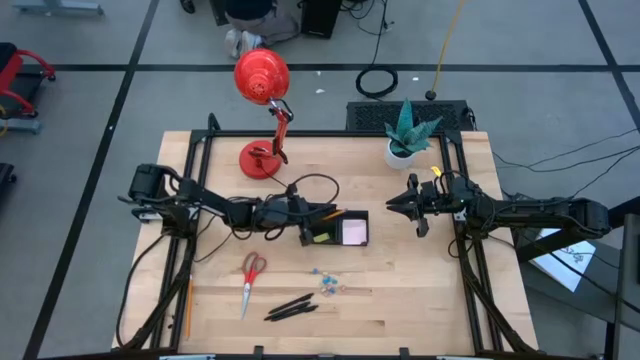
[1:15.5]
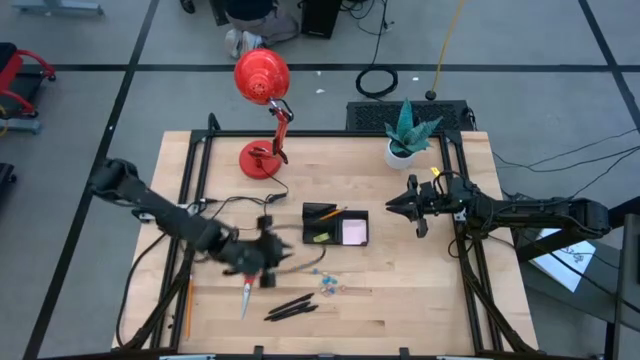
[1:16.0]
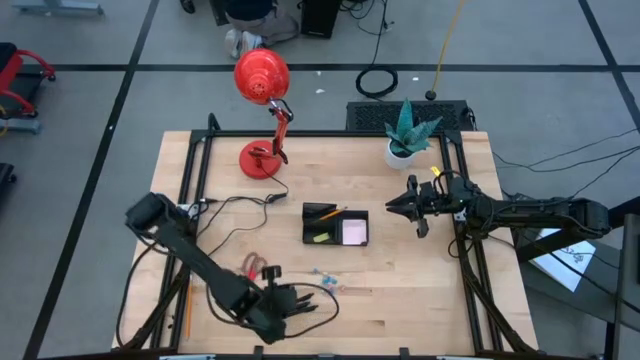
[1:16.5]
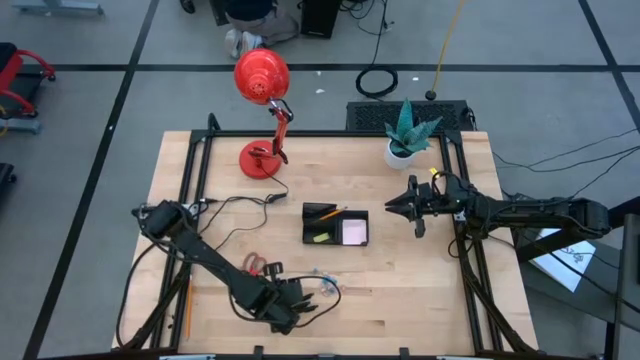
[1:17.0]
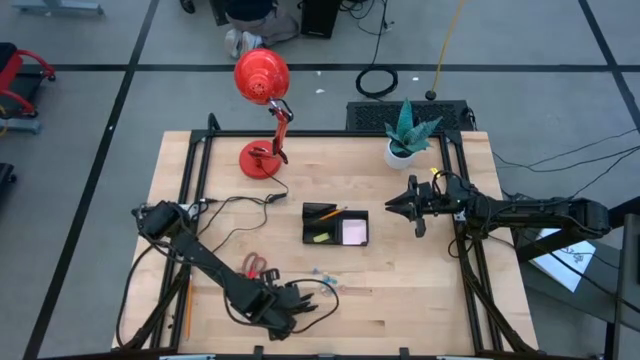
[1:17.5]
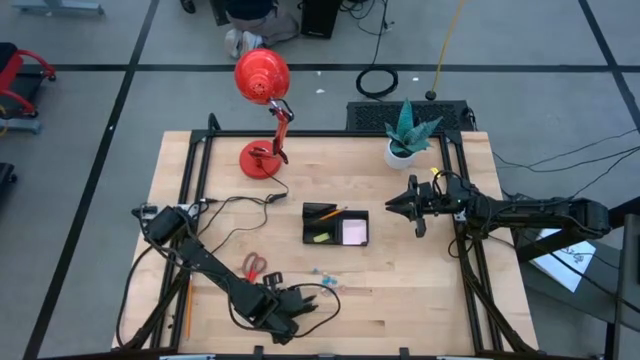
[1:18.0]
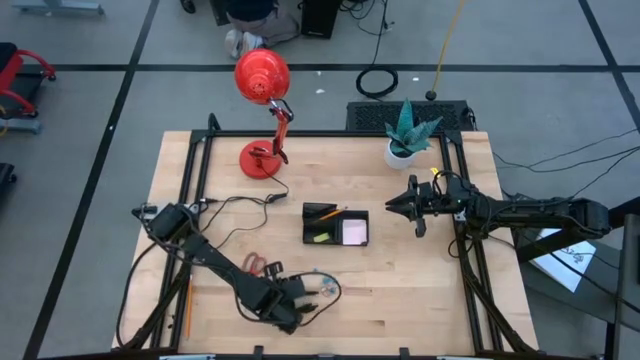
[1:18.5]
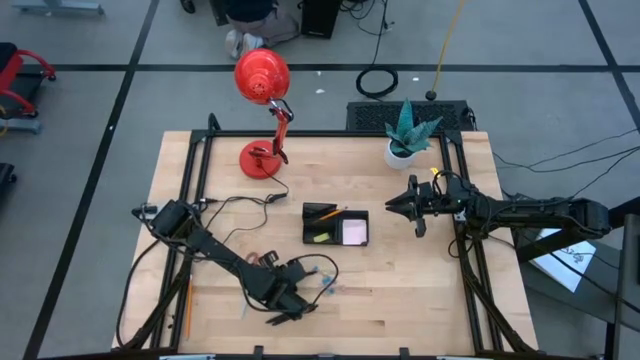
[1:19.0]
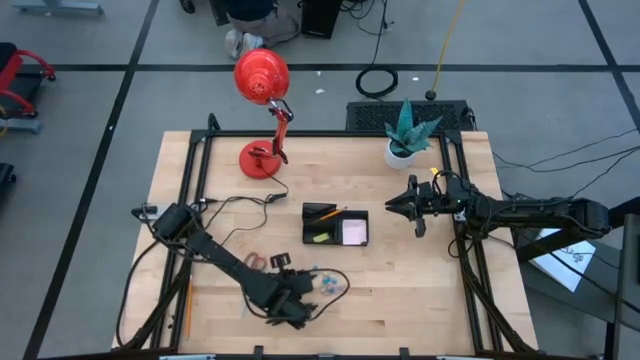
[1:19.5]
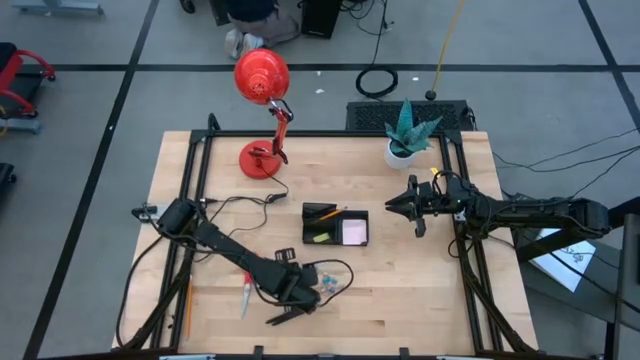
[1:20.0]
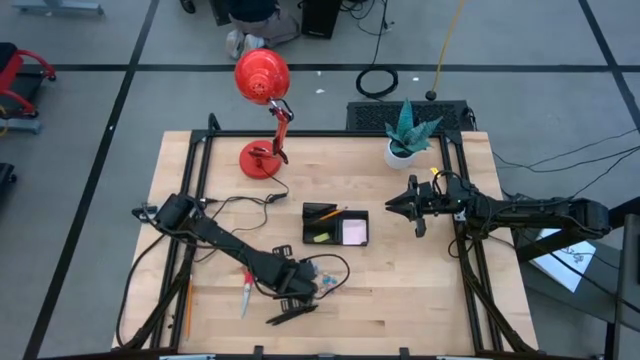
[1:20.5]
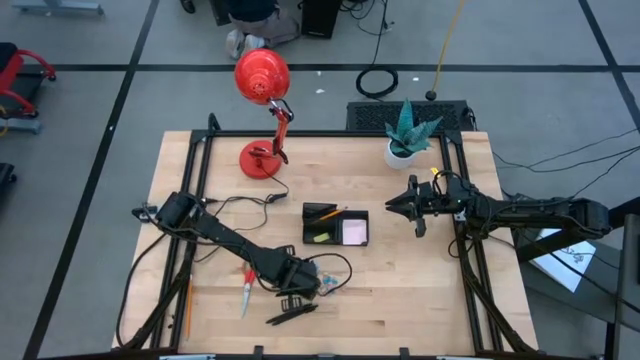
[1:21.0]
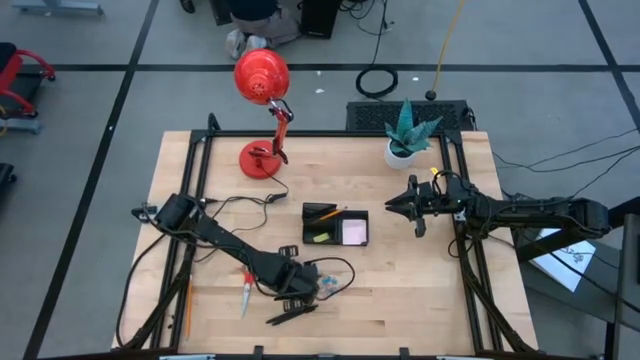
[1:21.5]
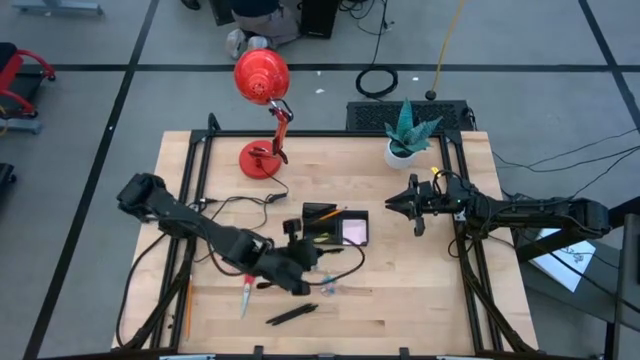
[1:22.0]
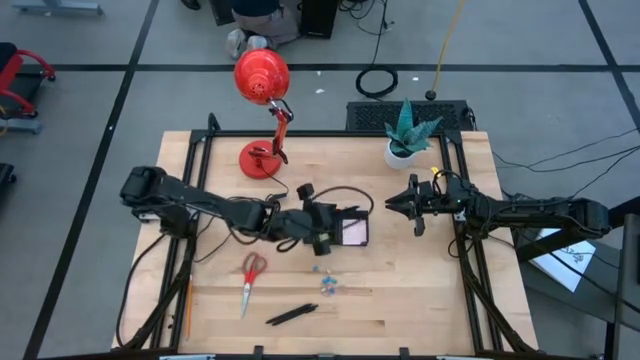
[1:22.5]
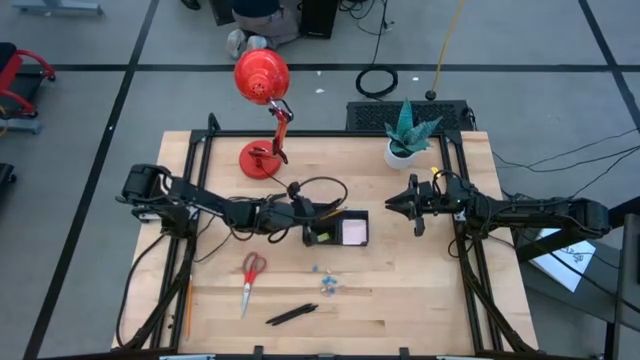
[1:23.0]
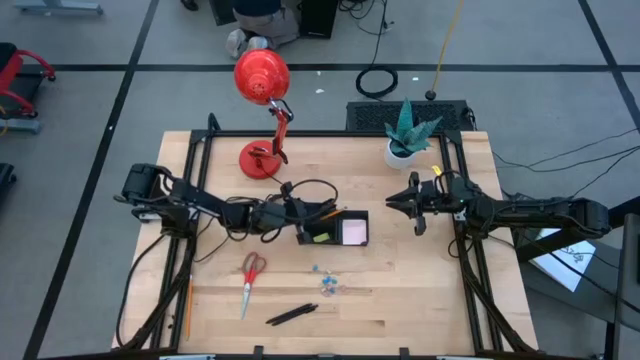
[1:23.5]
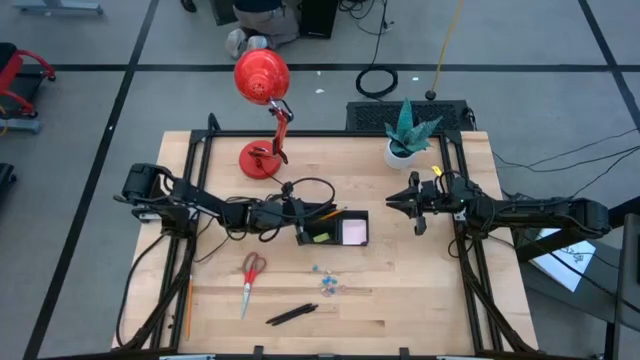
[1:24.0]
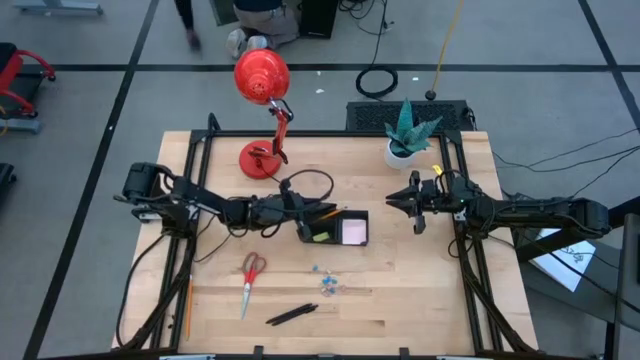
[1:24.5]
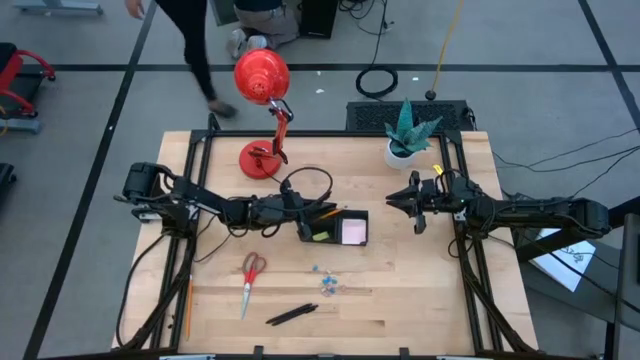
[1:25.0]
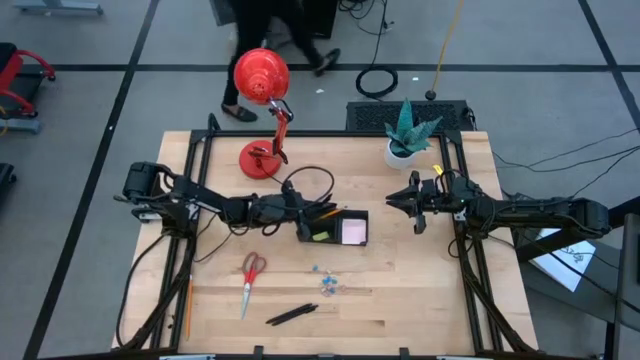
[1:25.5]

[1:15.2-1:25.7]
Task: Pick and place office supplies into organizer
Put the black pen into the black desk organizer

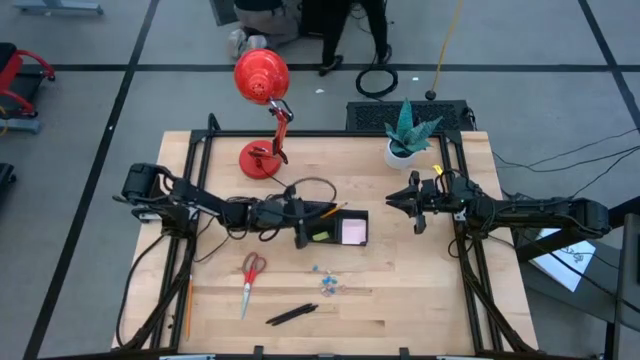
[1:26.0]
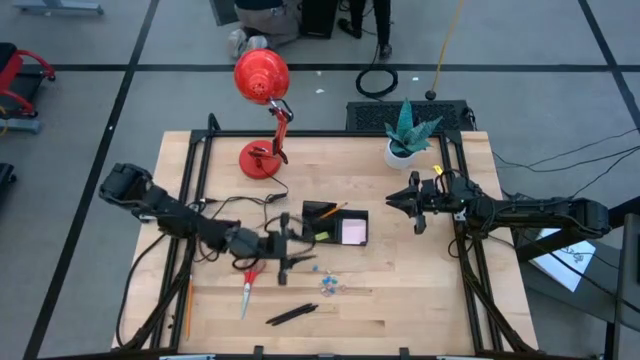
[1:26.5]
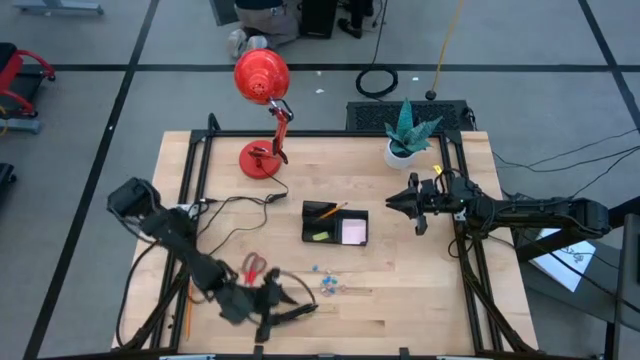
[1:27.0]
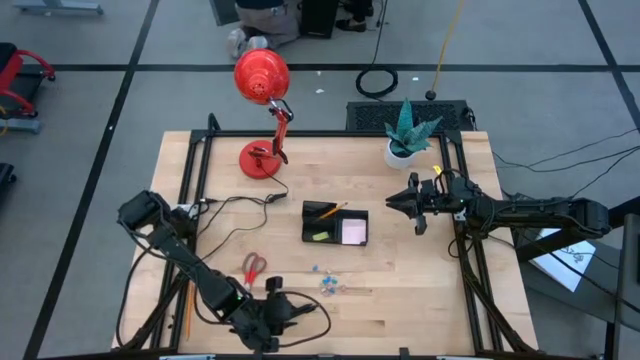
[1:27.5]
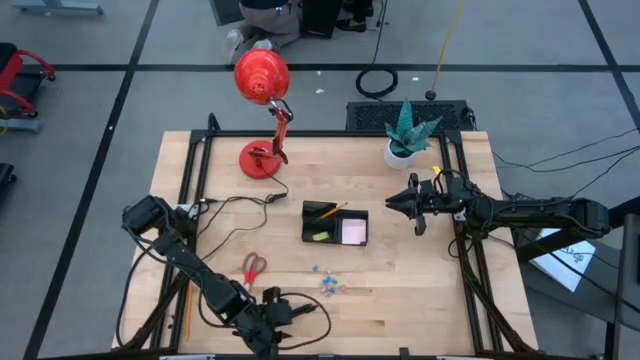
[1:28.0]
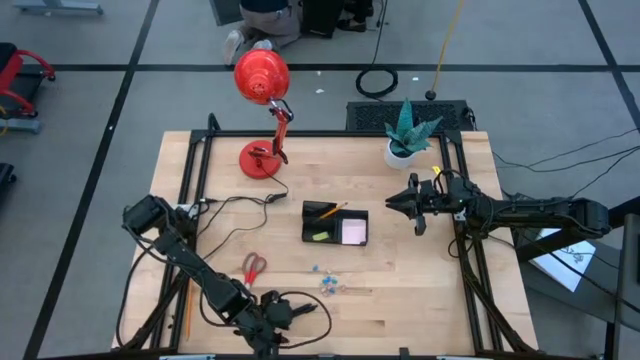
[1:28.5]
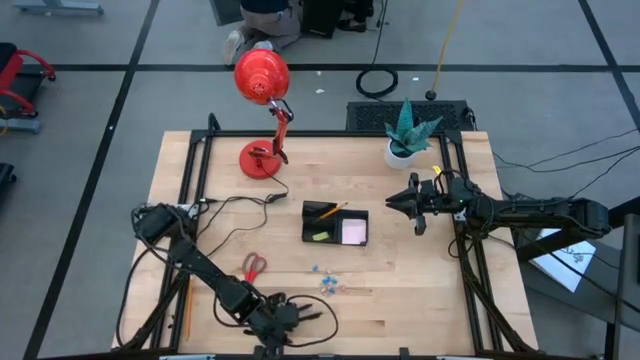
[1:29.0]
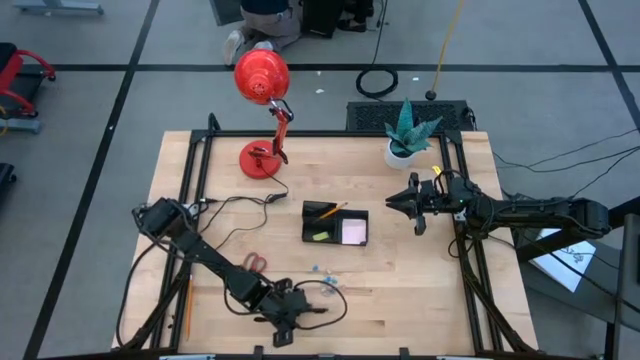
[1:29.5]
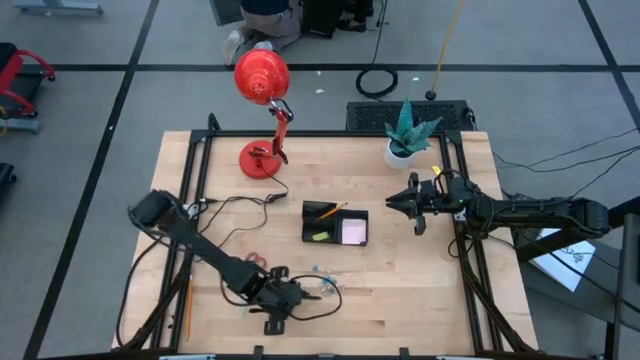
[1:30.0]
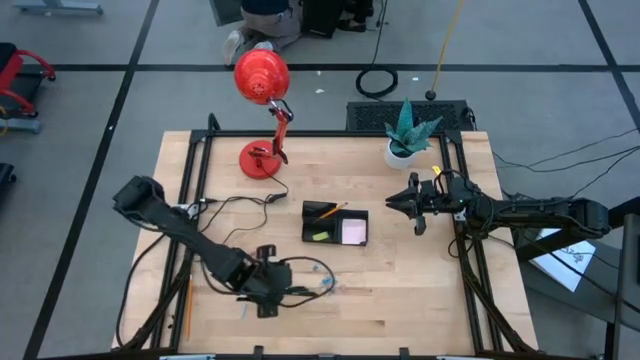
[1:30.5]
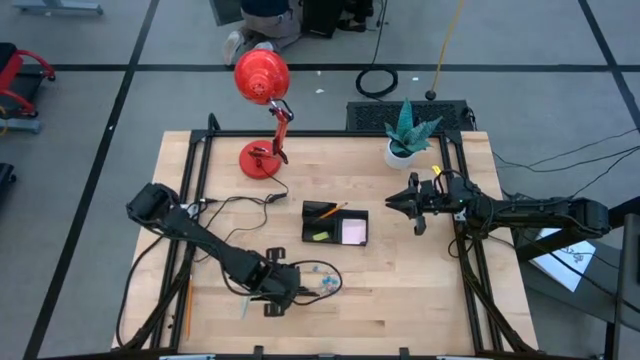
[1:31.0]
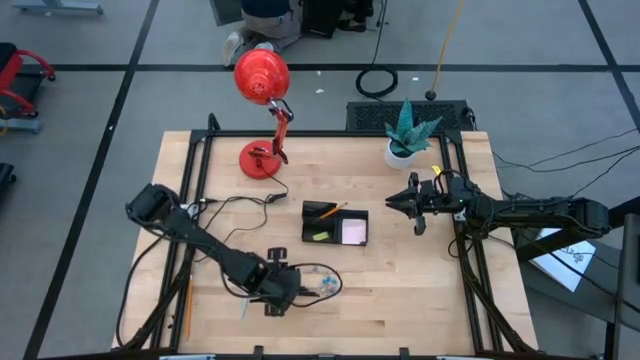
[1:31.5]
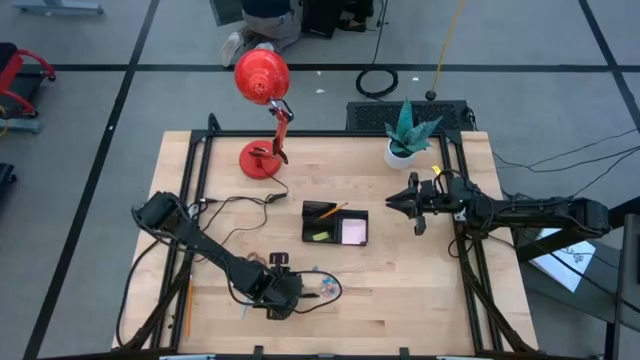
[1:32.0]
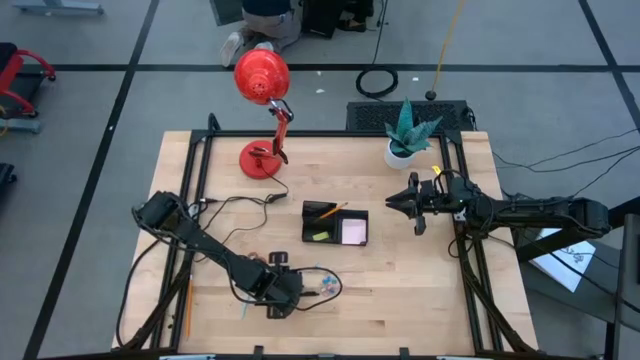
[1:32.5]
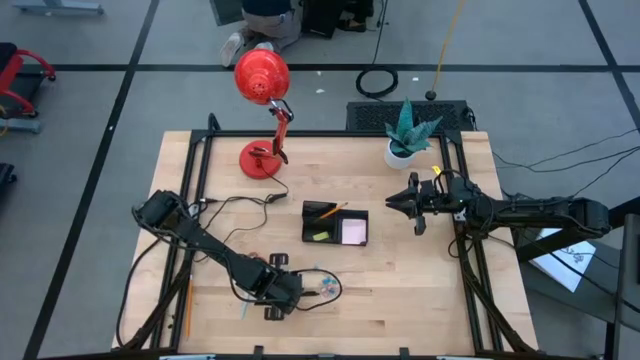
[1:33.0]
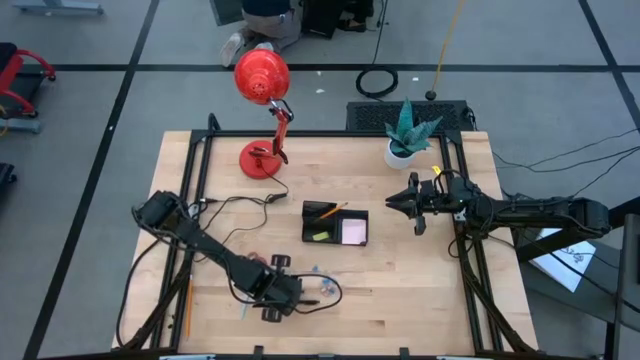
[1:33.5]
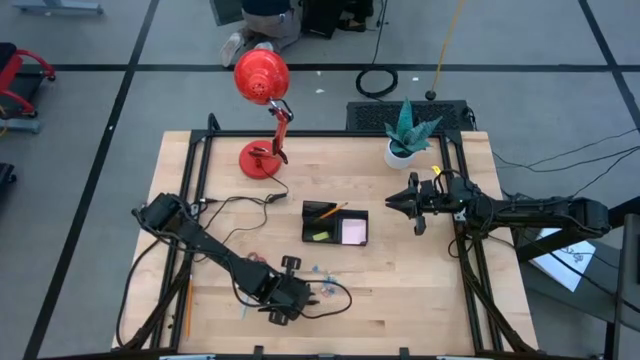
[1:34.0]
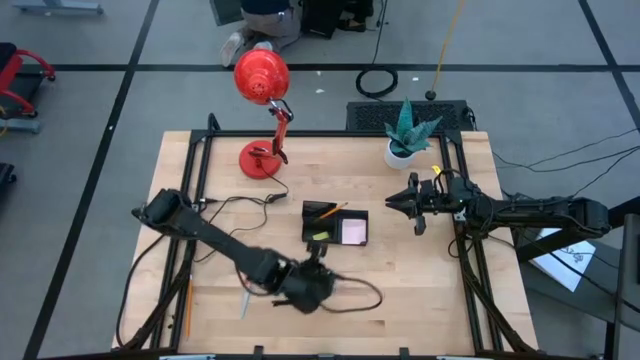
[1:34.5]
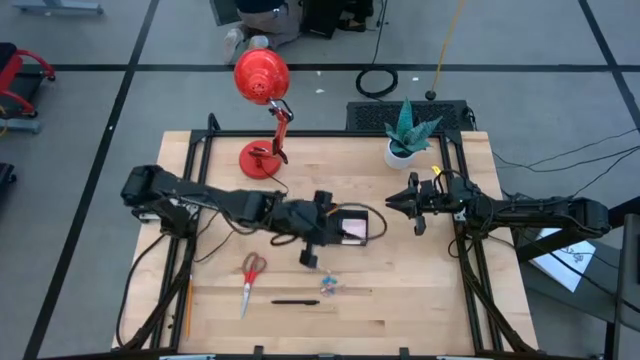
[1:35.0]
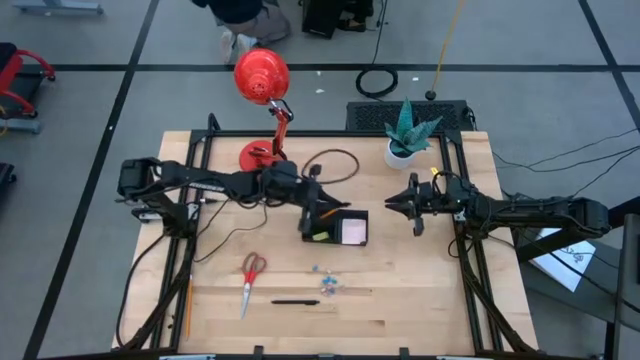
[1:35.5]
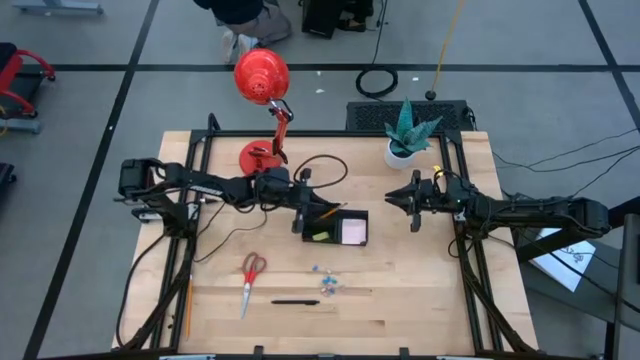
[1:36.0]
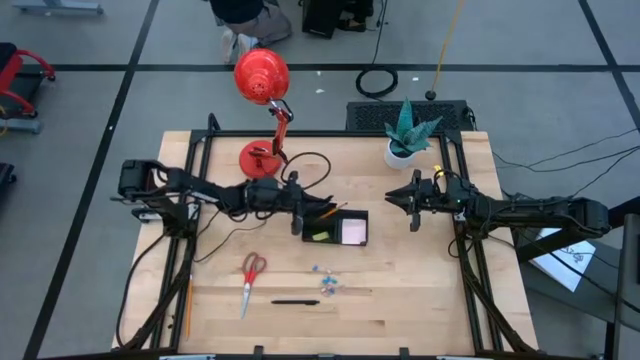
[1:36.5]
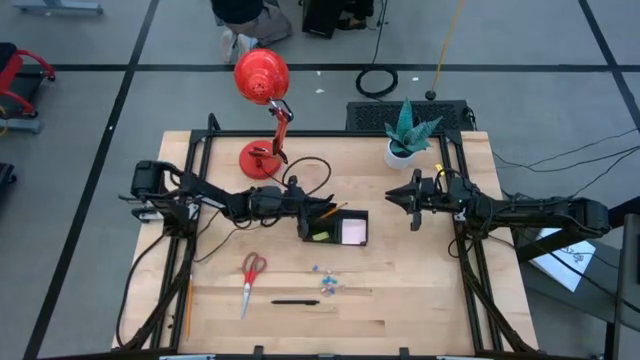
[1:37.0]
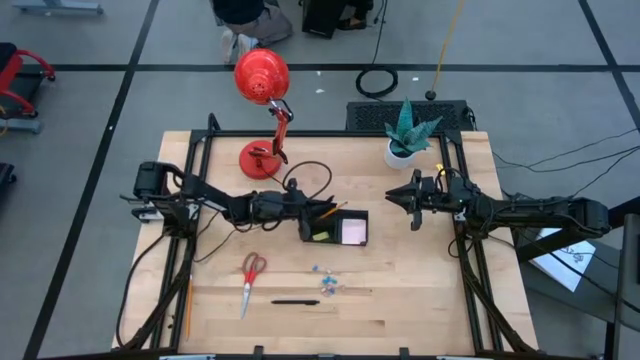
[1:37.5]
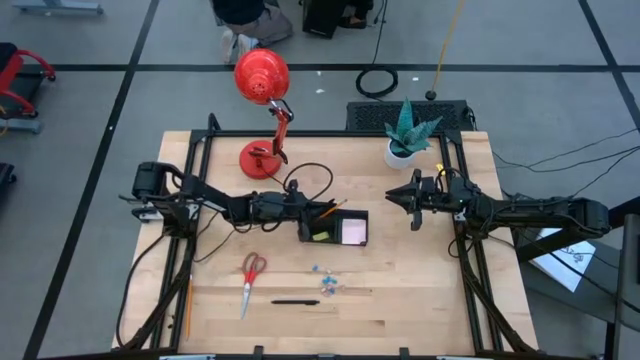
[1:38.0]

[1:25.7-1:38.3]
Put the black pen into the black desk organizer
